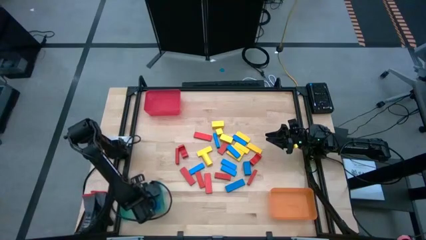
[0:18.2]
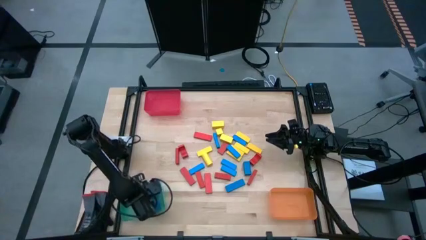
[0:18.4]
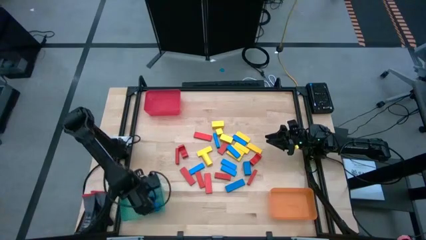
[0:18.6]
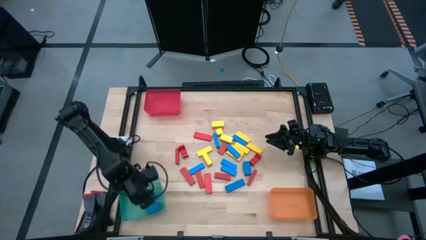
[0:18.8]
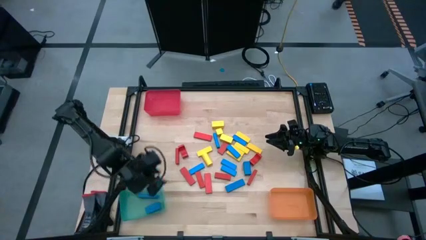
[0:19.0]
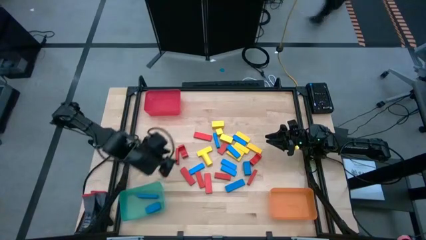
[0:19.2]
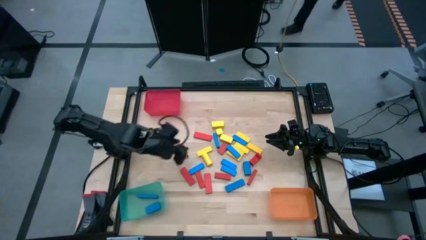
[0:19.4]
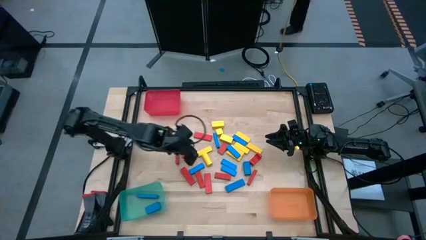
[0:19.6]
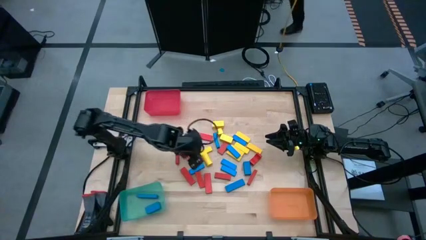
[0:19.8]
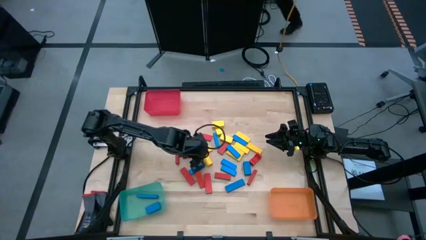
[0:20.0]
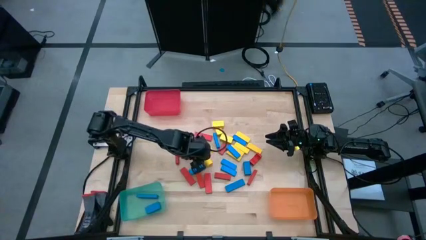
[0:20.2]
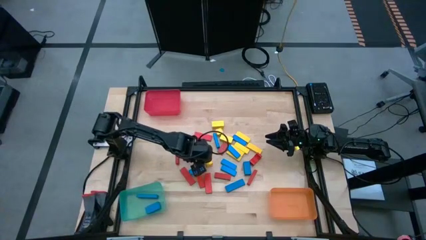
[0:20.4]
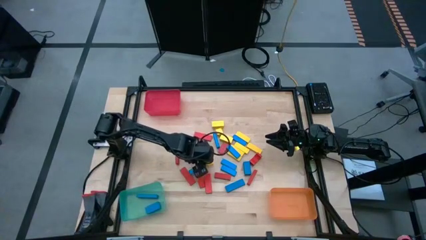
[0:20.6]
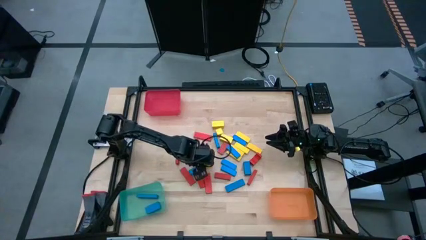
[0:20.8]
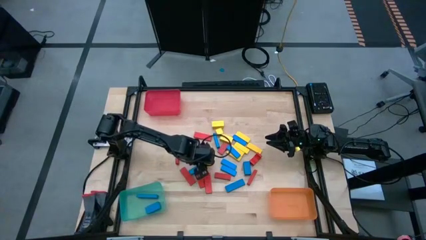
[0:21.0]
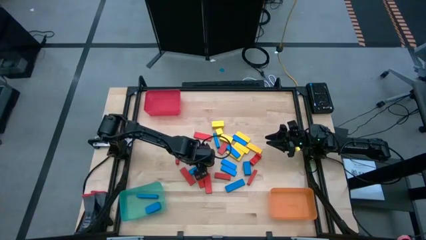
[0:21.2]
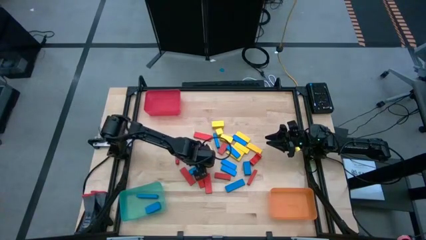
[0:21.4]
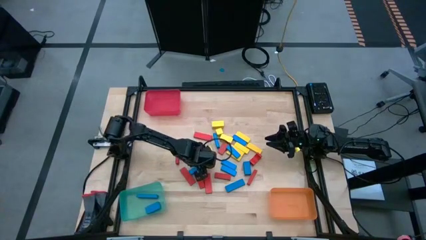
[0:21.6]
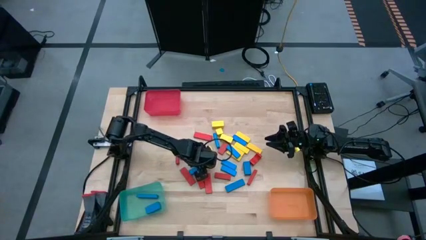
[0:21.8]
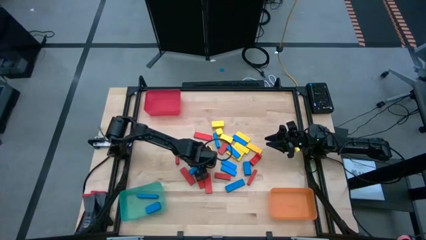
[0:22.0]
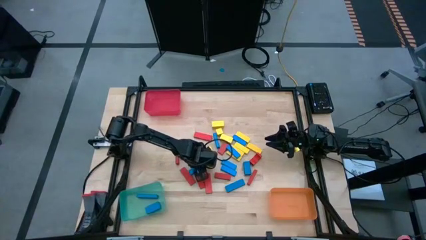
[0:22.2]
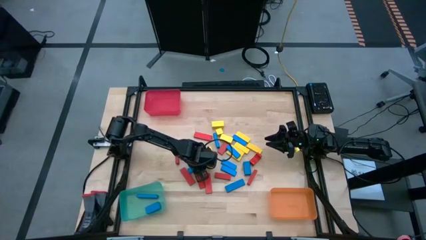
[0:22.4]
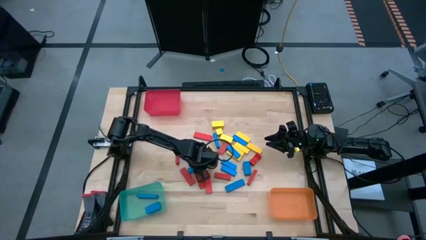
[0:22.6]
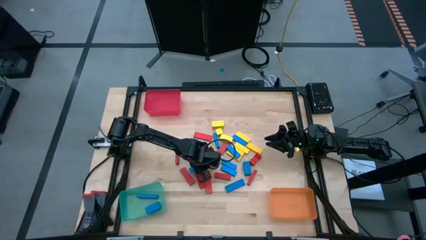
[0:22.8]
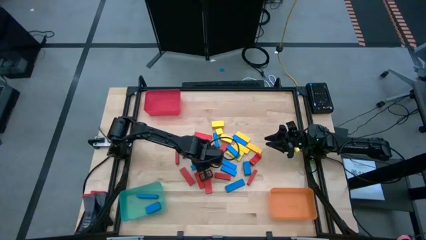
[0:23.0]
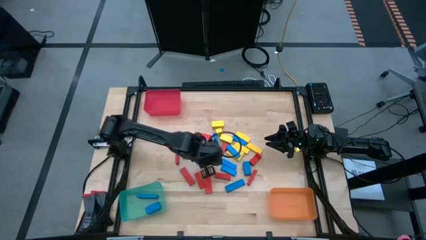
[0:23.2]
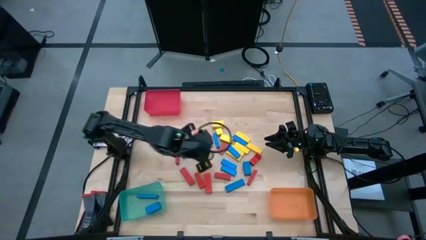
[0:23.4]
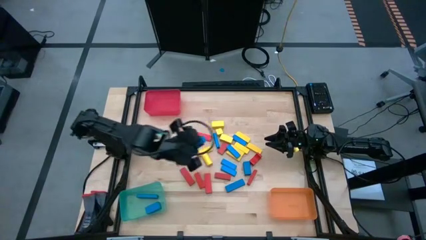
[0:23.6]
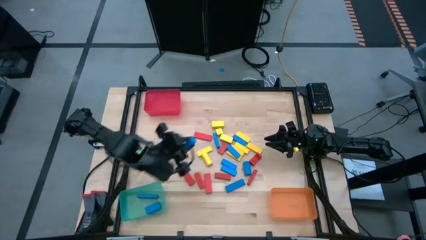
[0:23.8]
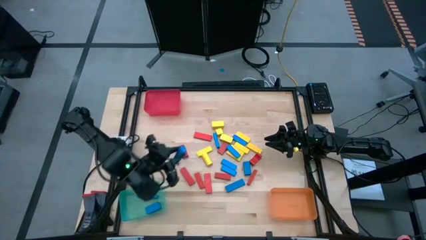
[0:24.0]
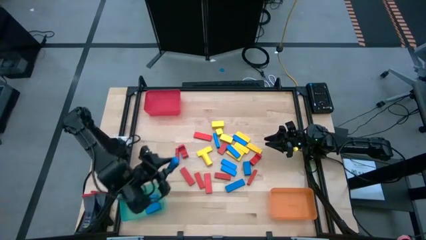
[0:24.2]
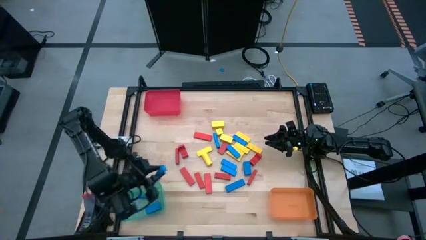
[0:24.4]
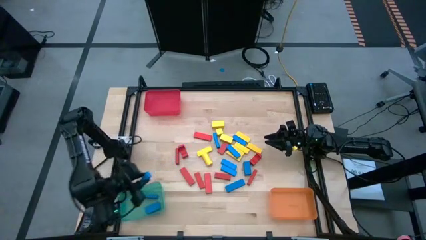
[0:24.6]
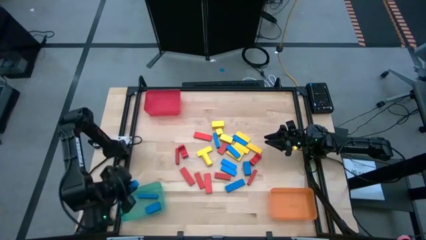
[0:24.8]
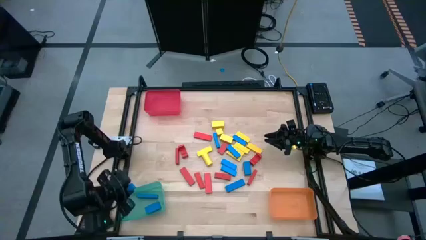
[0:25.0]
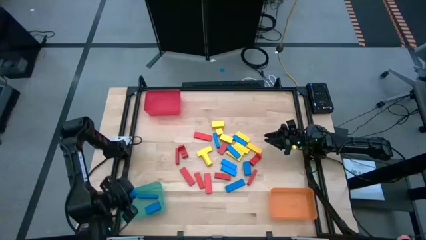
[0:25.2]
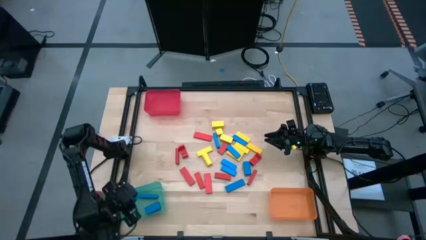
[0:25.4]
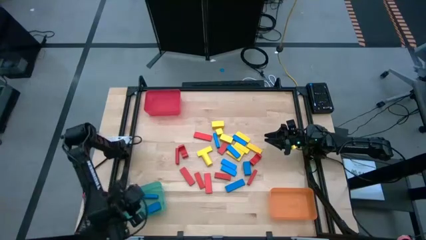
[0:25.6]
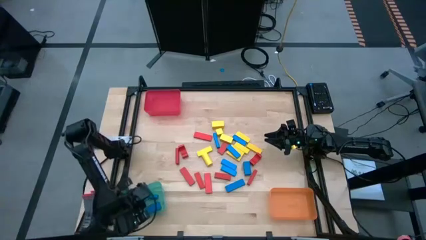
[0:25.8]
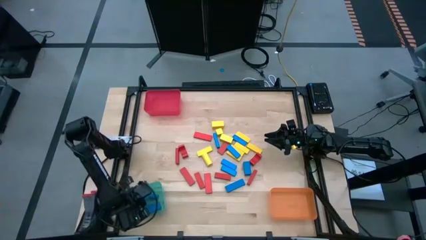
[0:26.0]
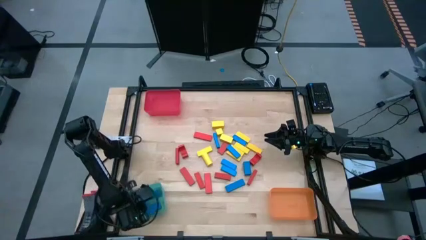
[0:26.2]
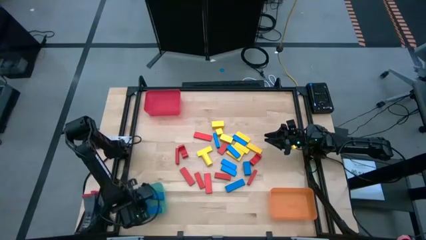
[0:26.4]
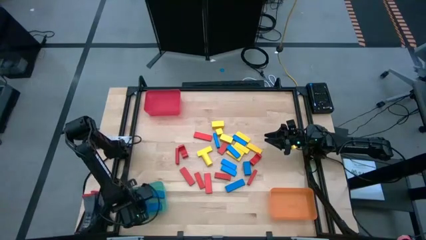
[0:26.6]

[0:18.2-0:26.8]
Task: Sort blocks
Put the blue block into the green bin

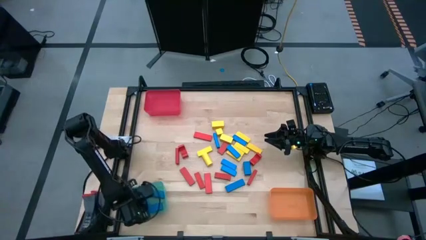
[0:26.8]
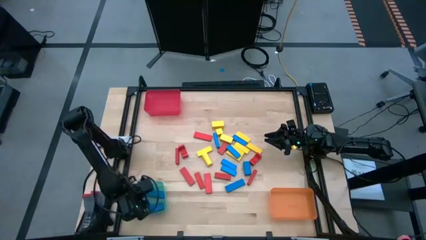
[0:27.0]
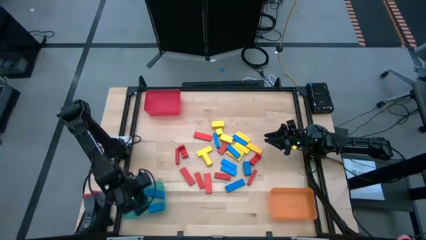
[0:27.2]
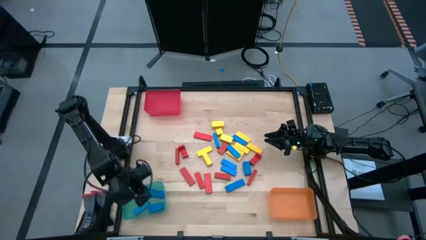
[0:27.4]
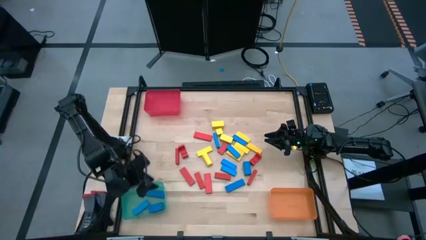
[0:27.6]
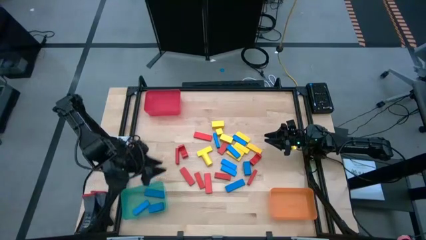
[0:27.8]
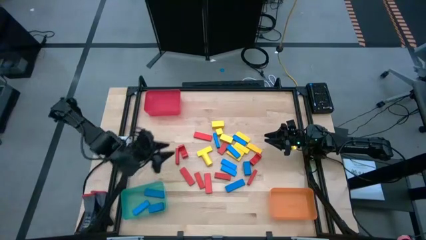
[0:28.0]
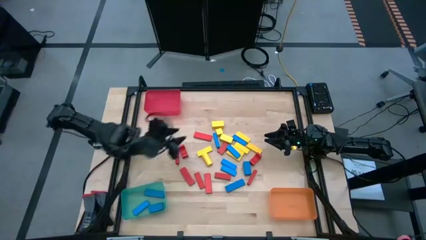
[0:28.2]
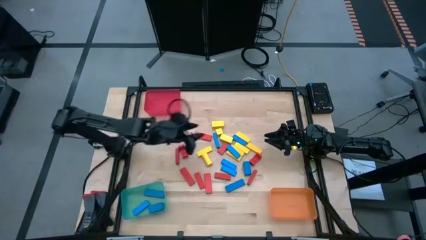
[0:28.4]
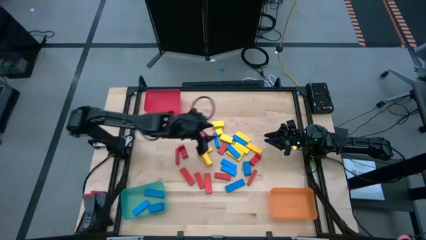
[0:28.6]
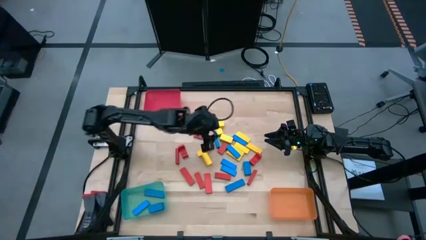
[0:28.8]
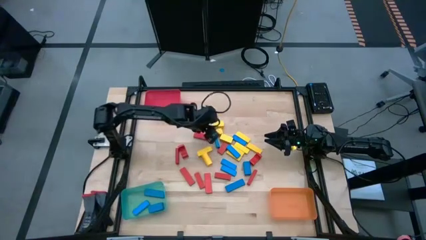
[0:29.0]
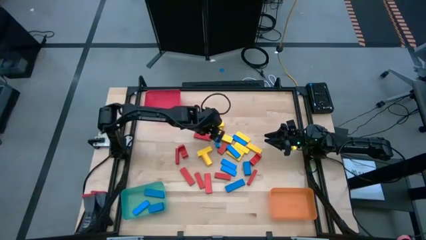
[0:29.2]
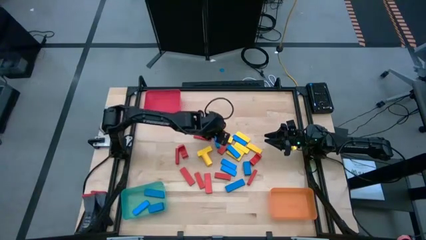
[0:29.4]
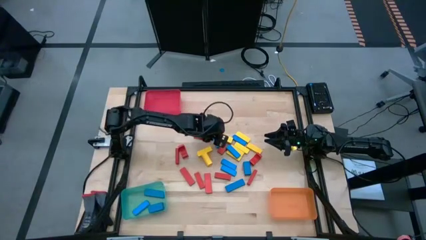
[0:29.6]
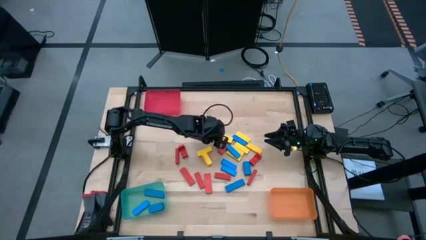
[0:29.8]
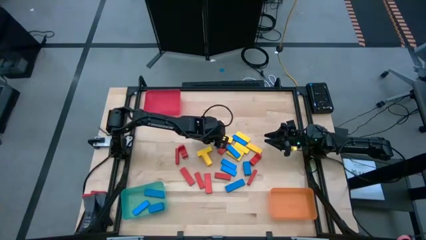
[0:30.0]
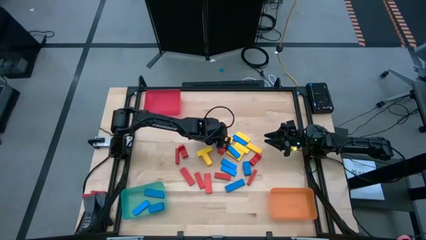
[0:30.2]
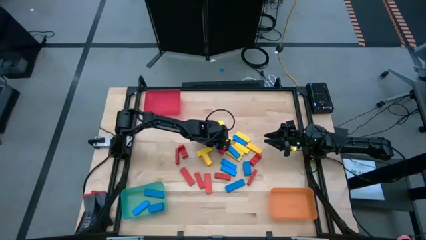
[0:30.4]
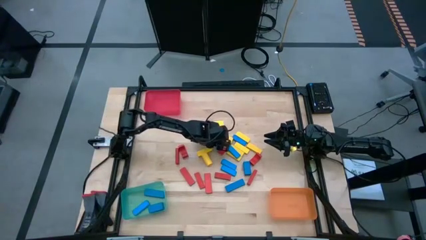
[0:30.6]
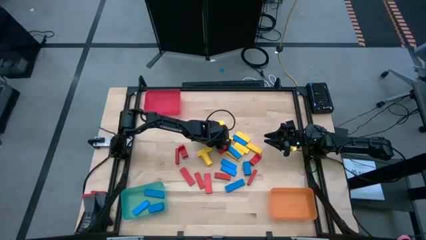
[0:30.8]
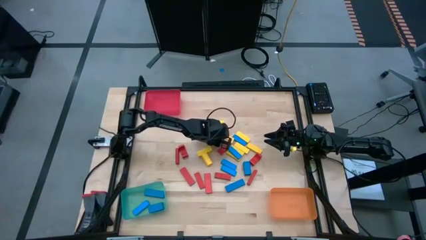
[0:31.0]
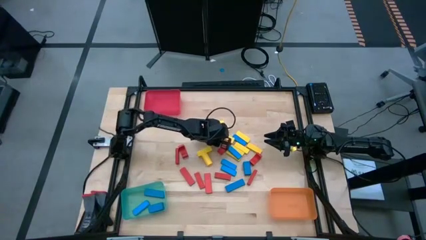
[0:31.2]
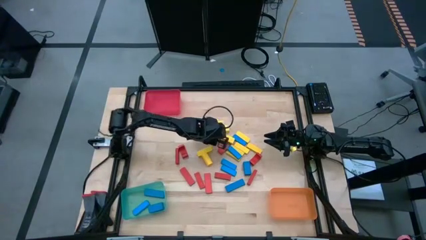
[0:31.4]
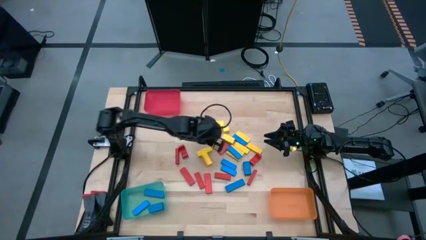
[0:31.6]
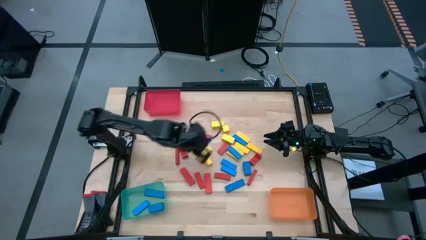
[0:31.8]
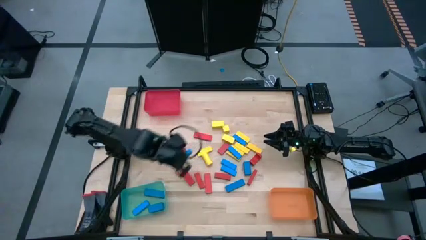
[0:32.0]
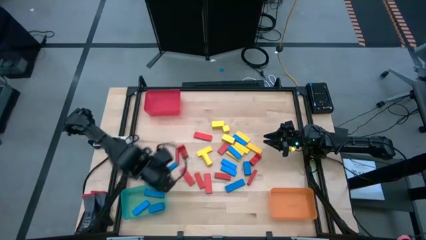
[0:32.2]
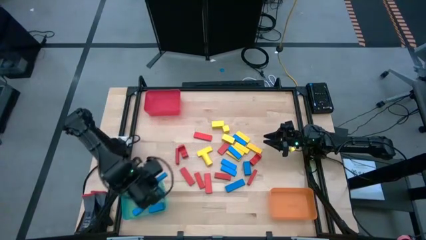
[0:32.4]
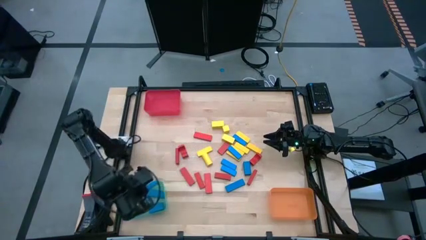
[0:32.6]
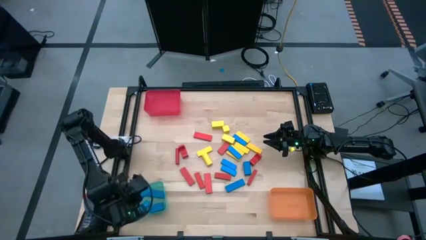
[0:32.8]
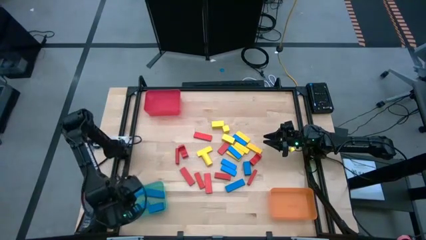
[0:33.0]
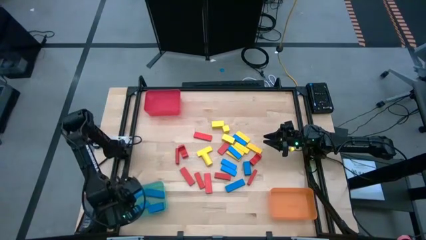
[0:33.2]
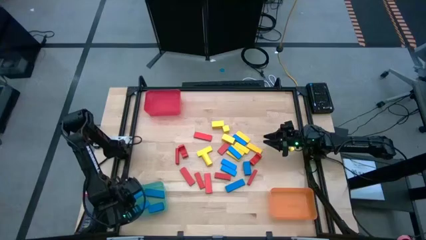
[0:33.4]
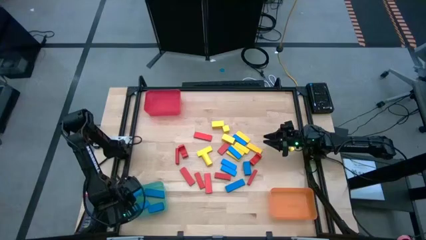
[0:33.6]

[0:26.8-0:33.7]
Put the blue block into the green bin

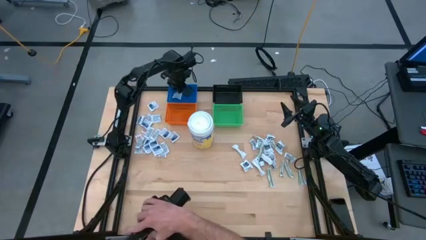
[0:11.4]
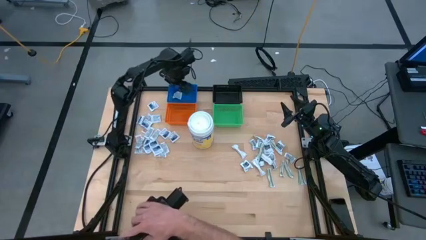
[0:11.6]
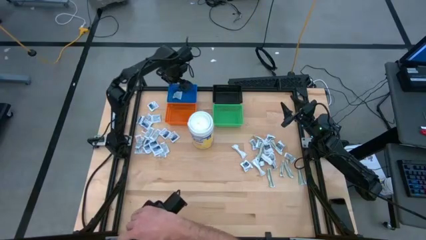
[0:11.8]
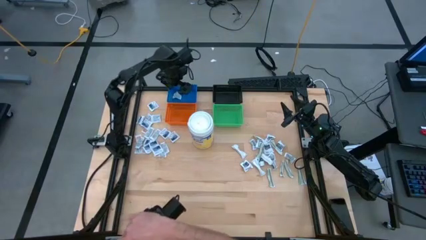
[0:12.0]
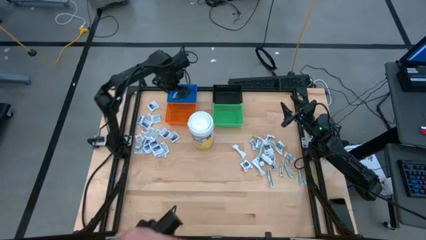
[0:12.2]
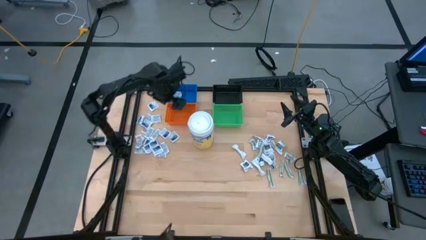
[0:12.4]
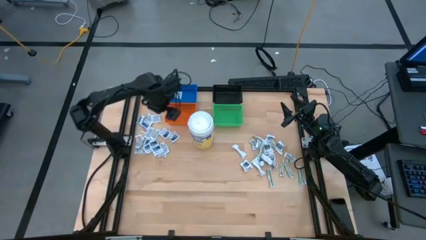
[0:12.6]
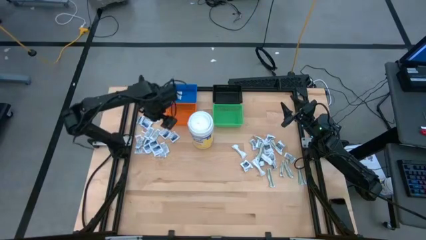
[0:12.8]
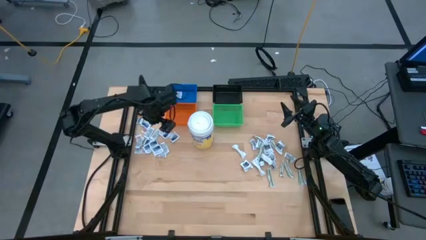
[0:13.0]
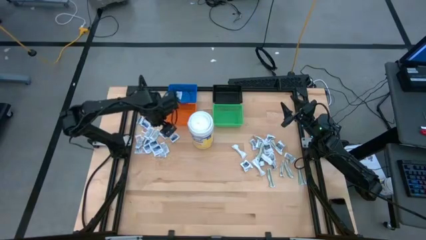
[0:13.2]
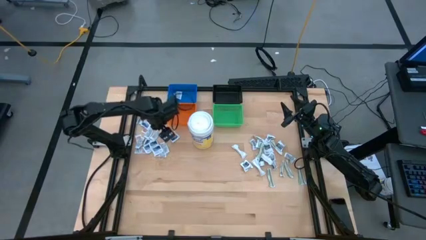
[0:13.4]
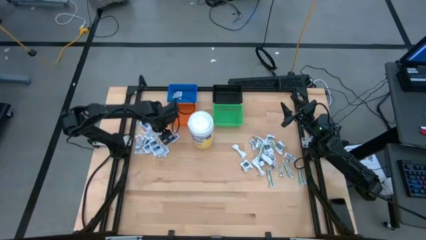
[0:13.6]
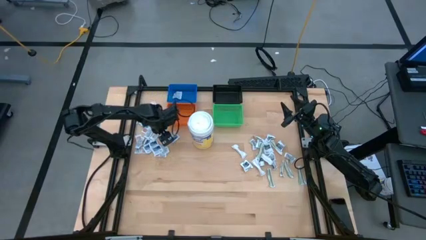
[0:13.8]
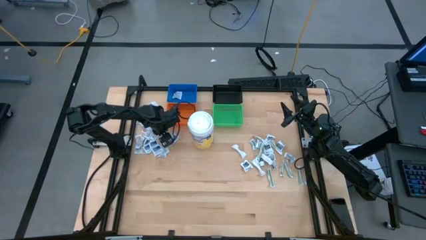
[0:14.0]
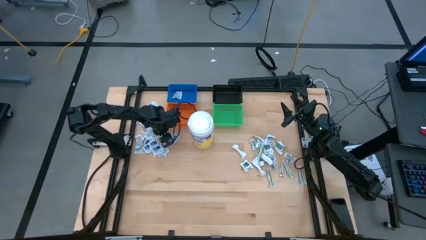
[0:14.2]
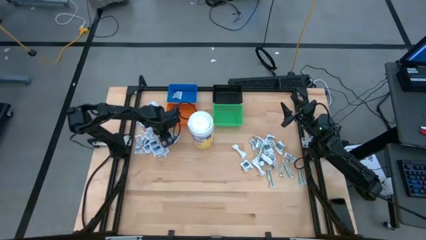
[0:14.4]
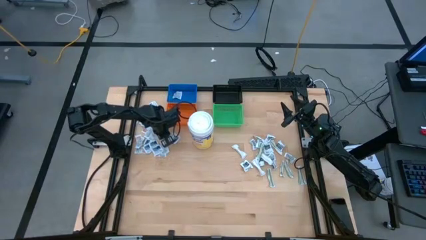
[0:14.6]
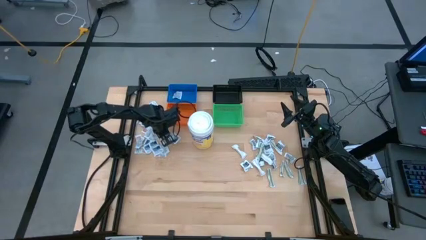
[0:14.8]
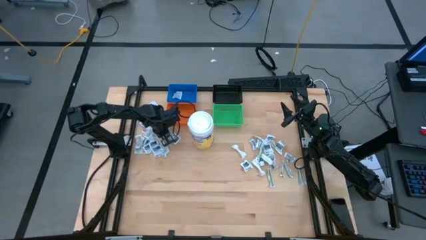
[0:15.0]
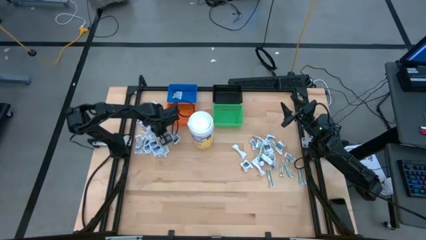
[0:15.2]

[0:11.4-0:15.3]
Task: Pick & Place First Aid Supplies
Put the blue alcohol pad into the blue bin
